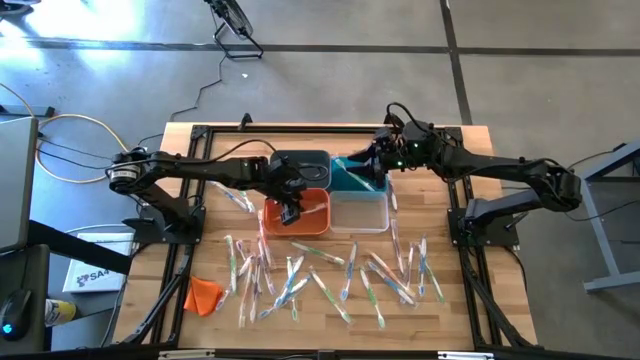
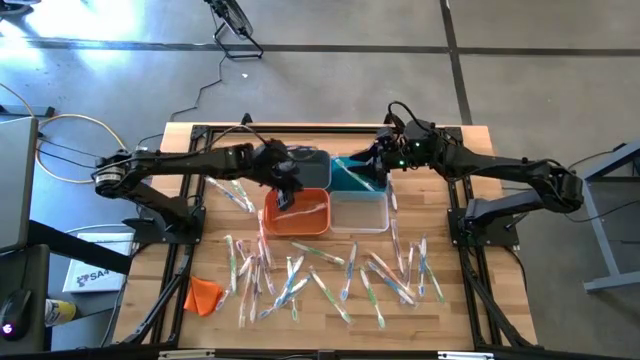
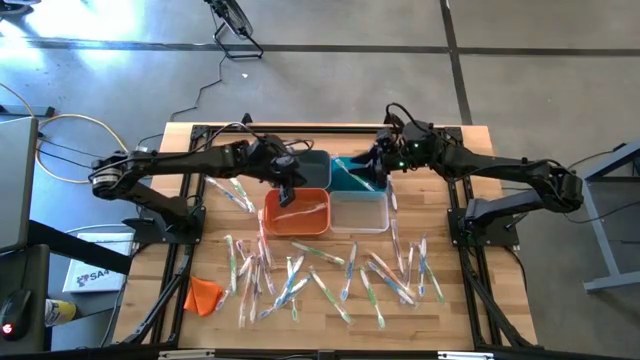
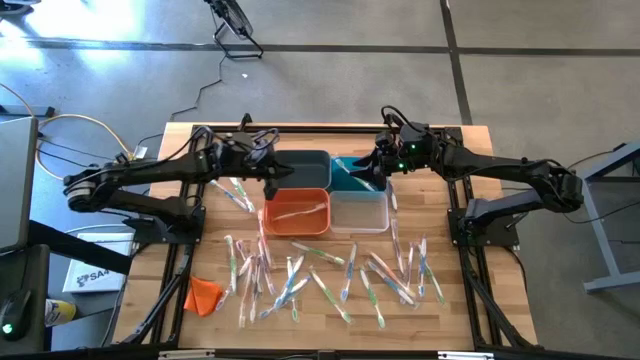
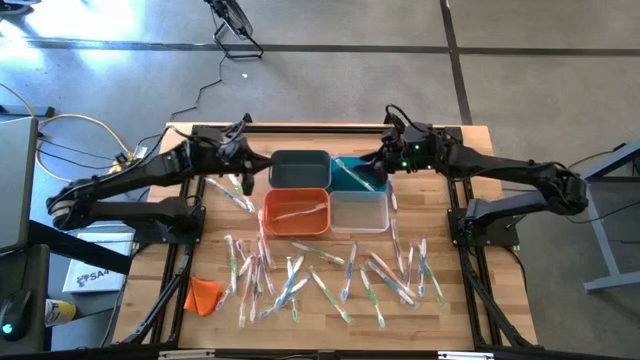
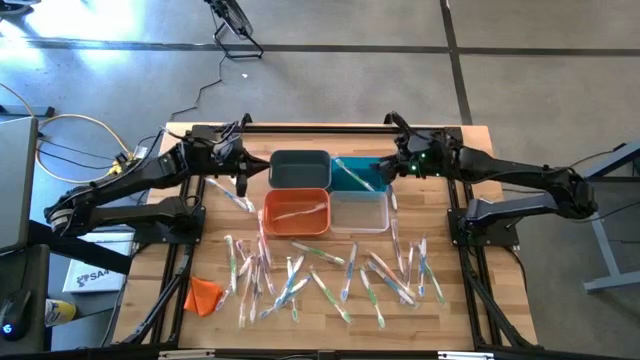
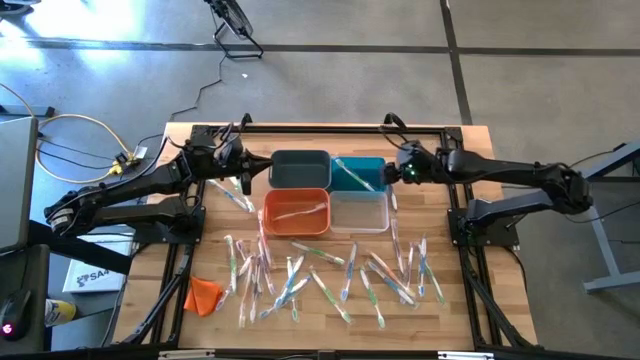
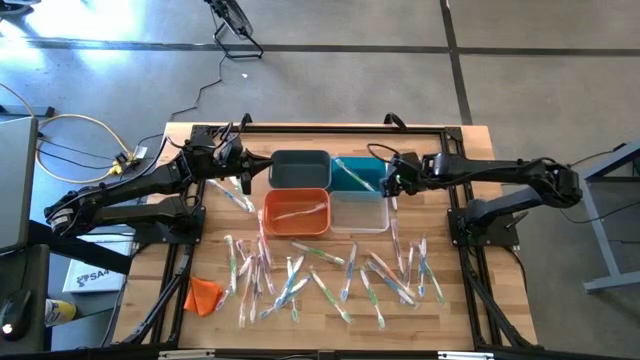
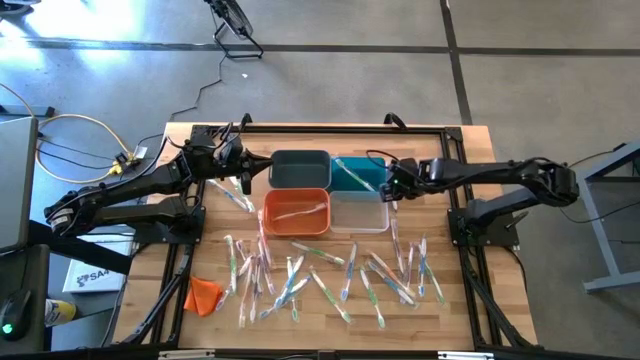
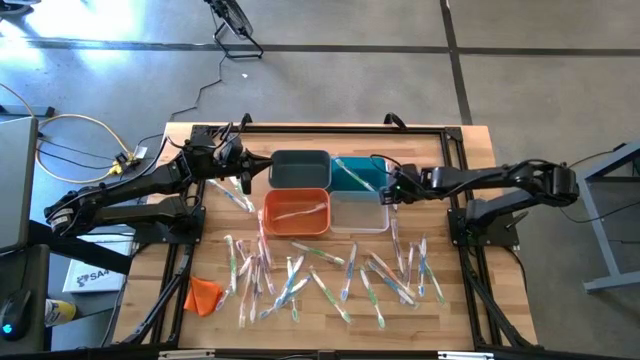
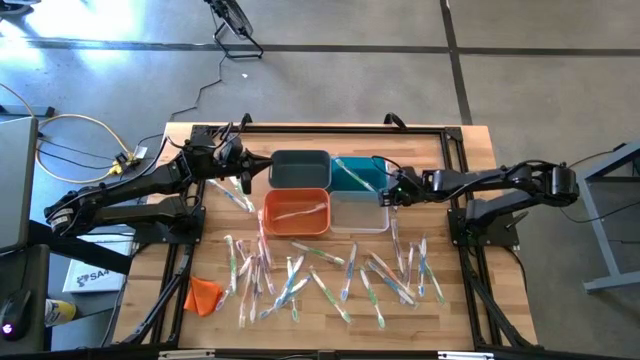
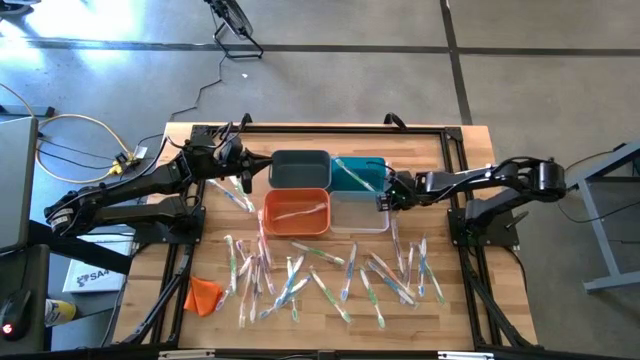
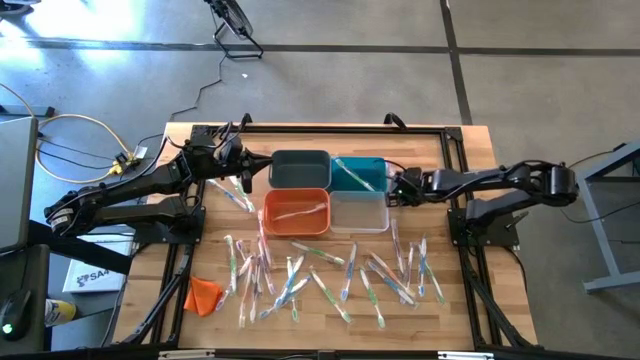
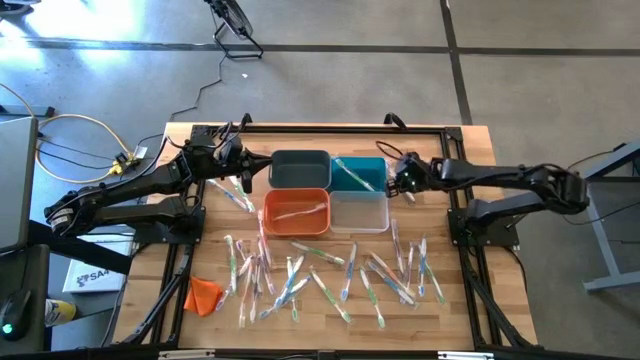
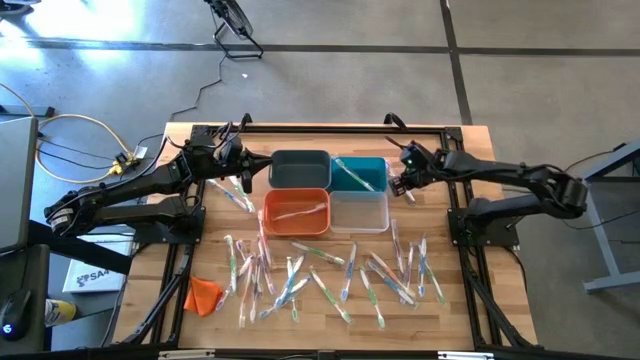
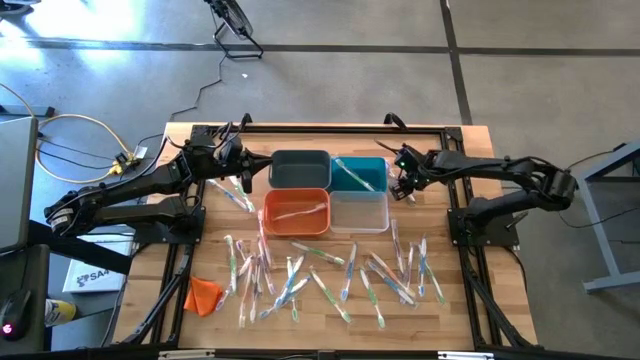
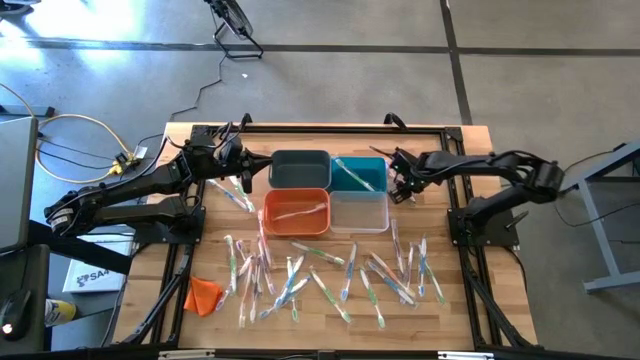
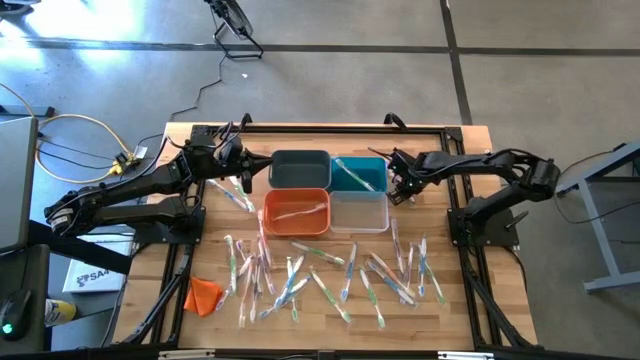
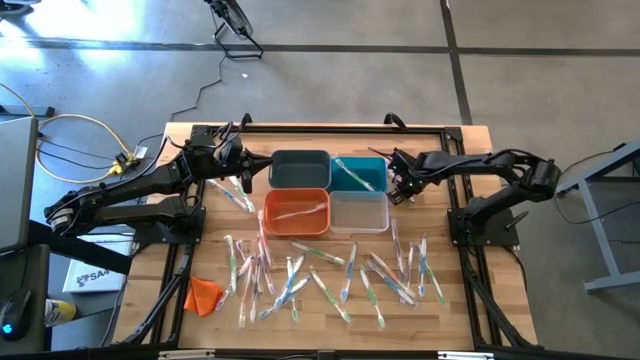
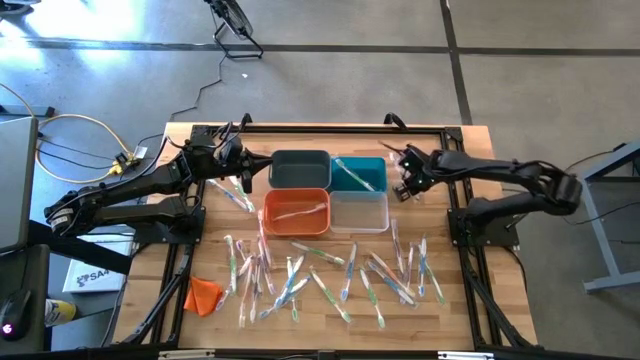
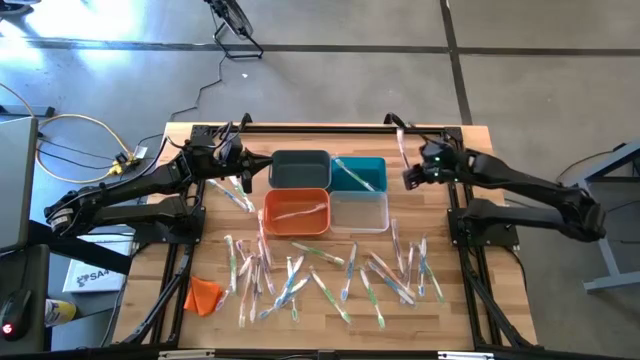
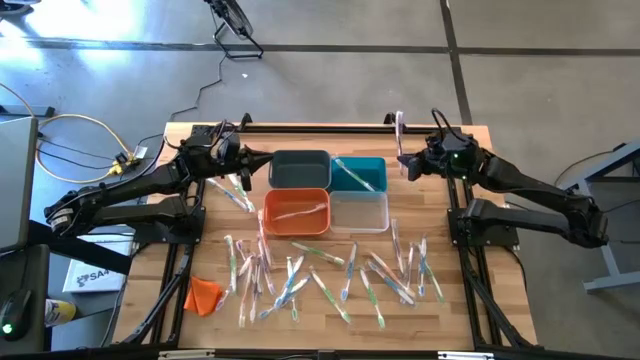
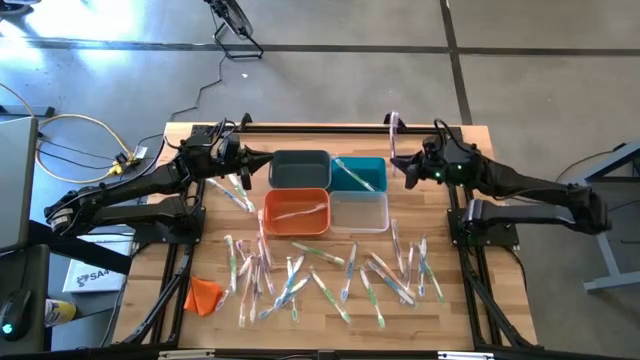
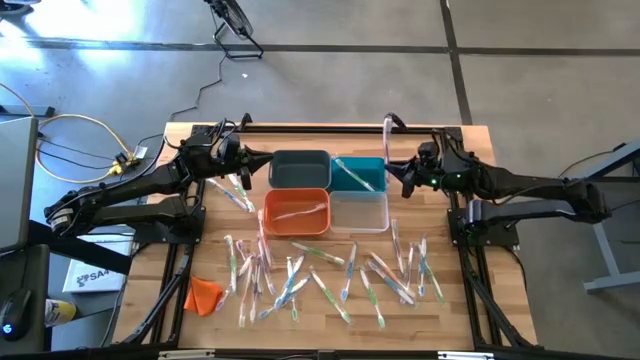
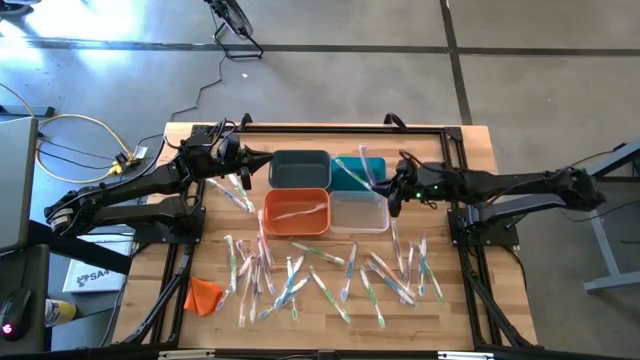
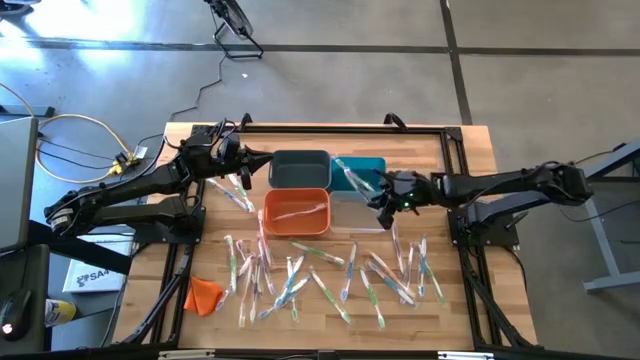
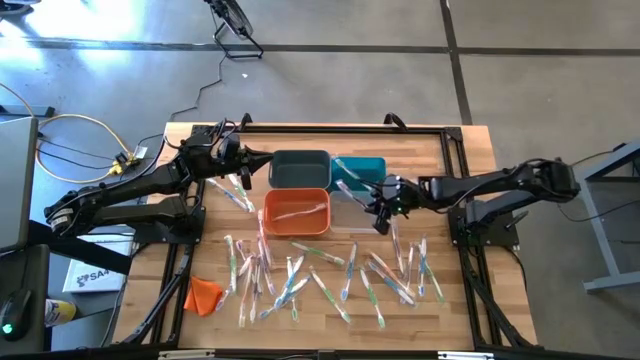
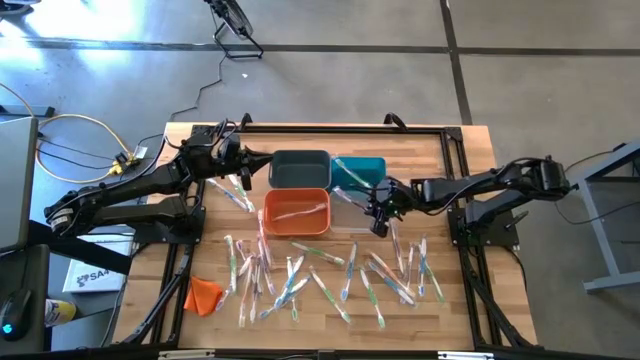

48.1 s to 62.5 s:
Task: Pick & Place Toothbrushes
Put the purple toothbrush into the transparent bin

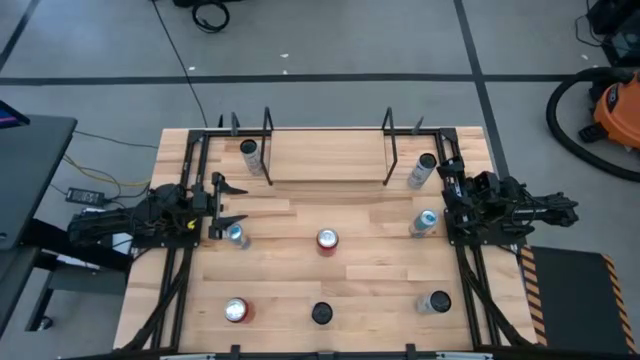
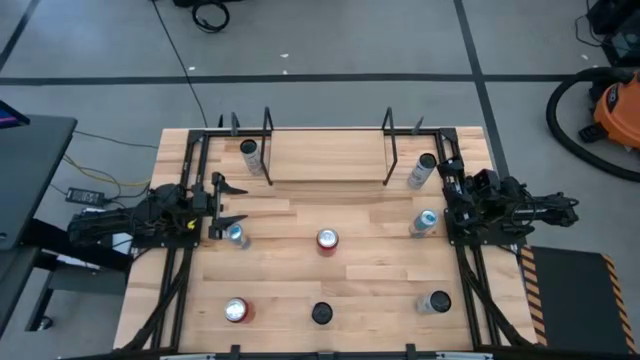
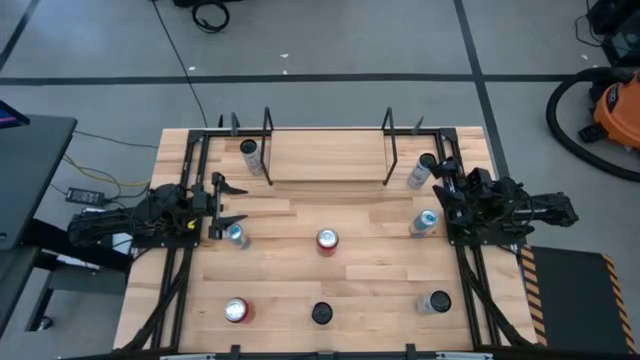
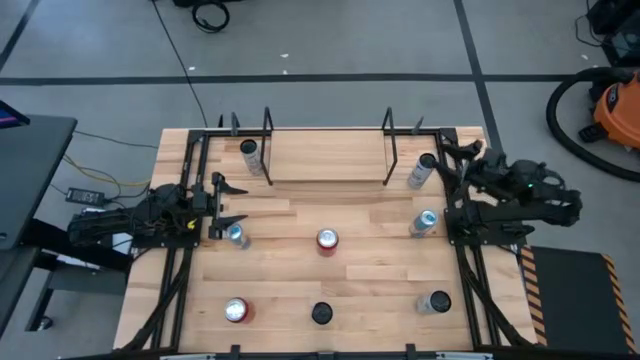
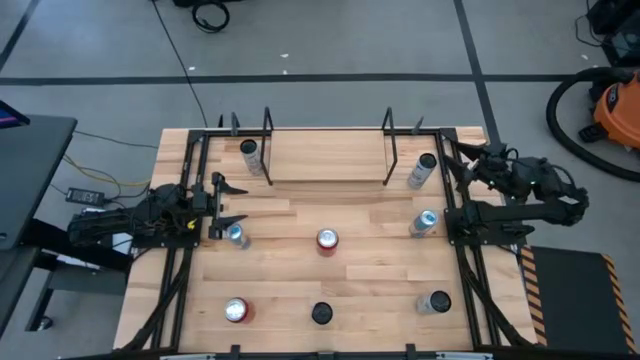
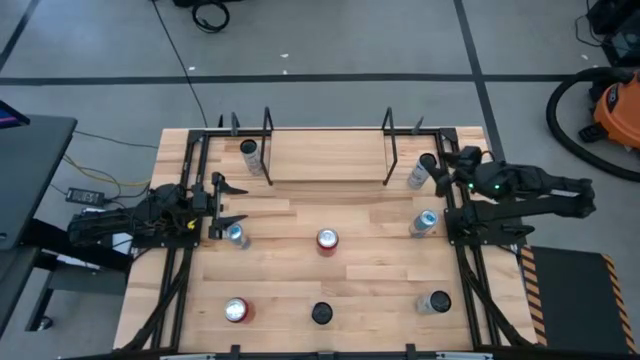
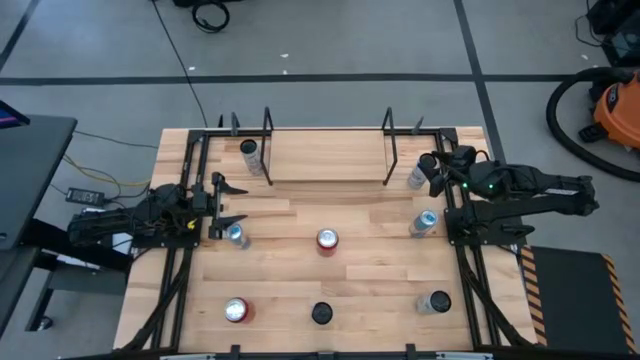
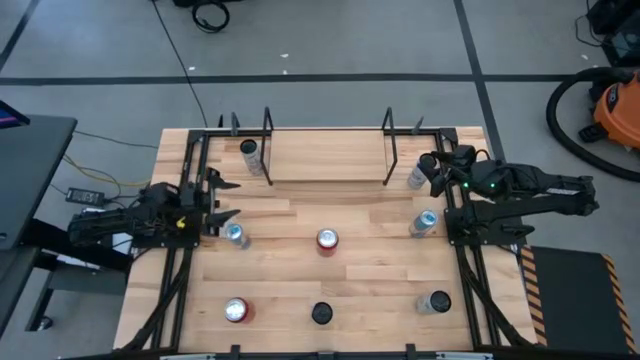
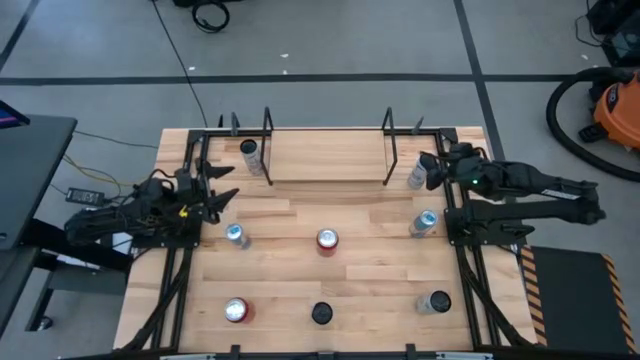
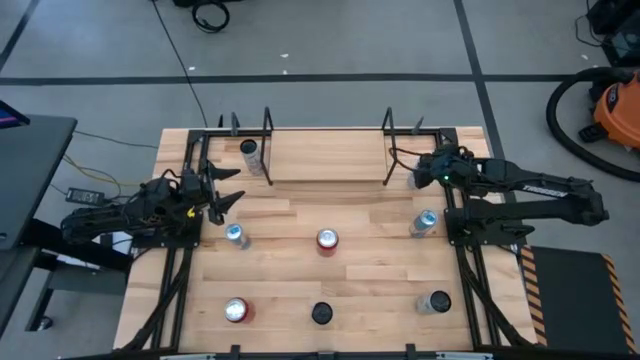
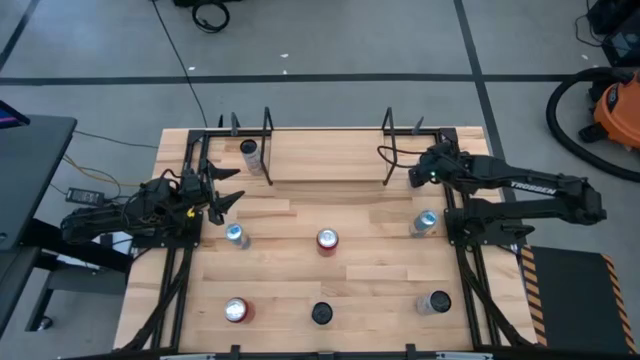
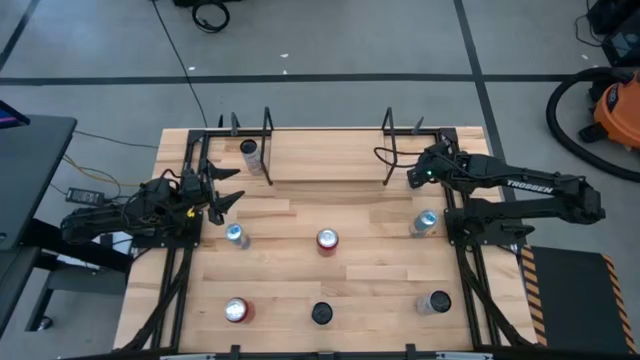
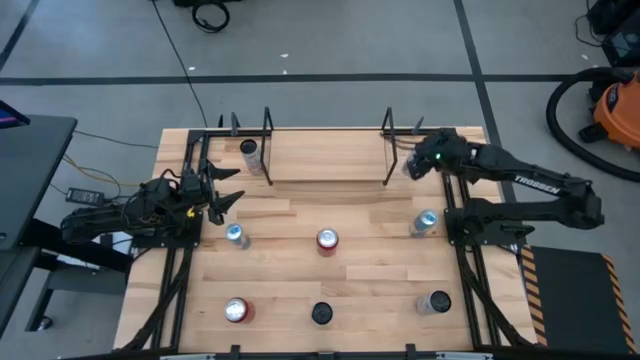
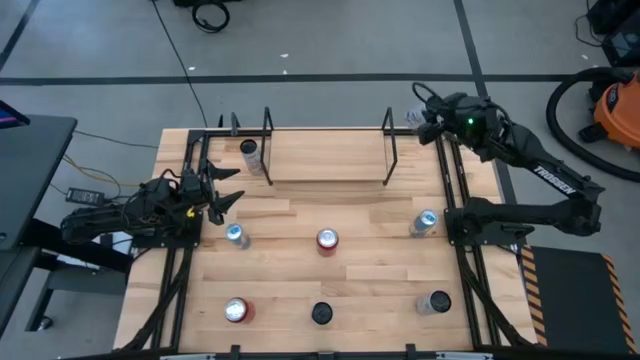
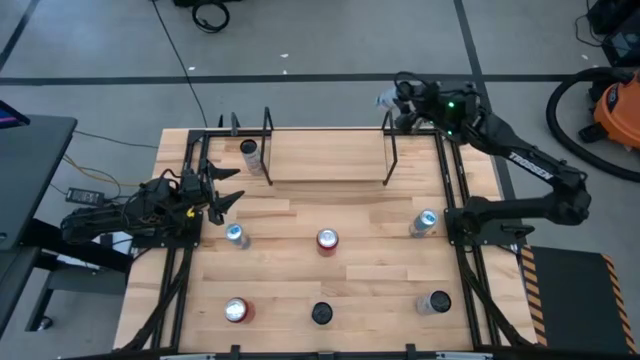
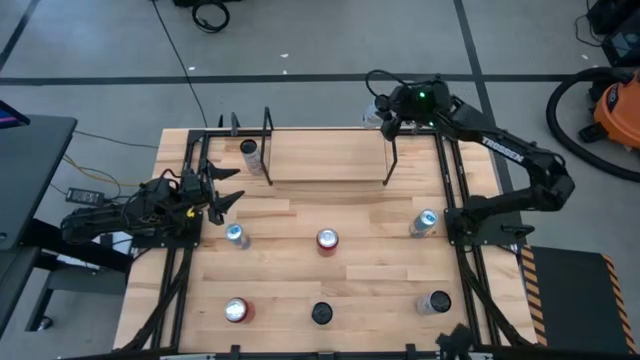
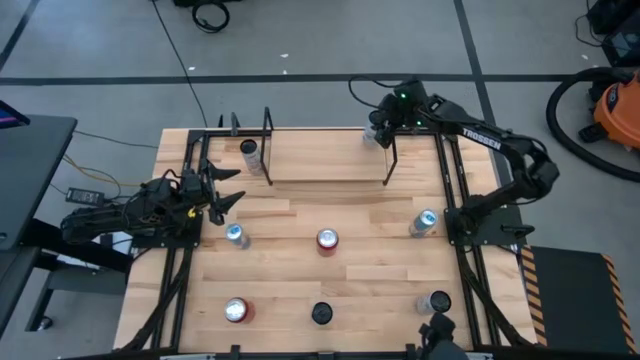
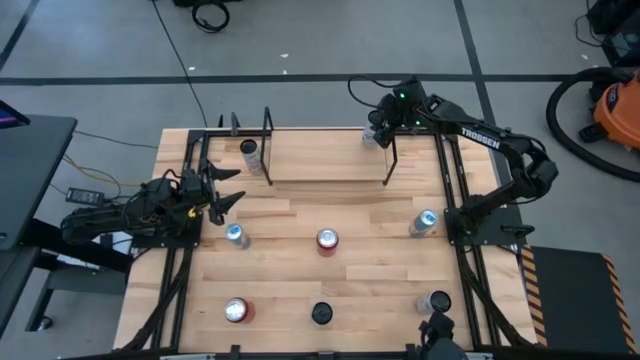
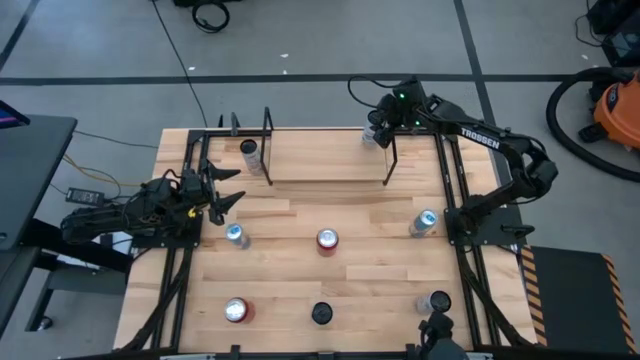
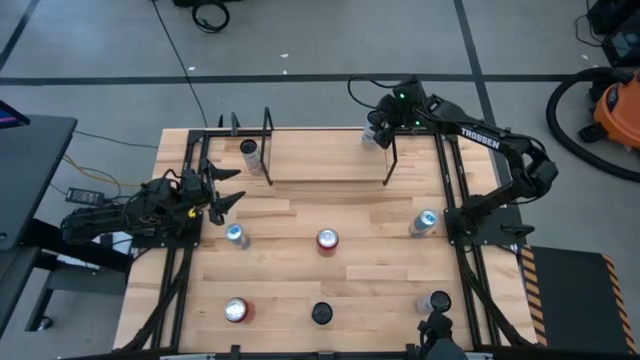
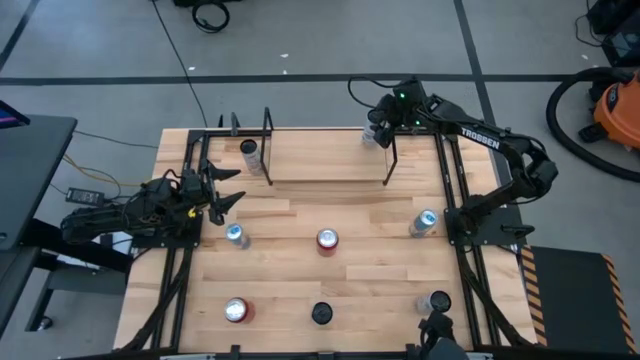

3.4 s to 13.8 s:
Task: Place canned beverage on shelf
Put the top white-blue soda can on the shelf
